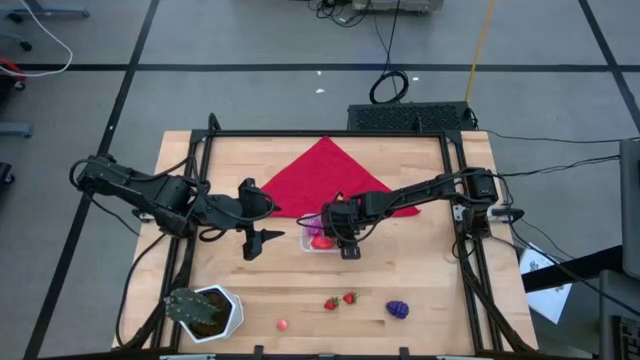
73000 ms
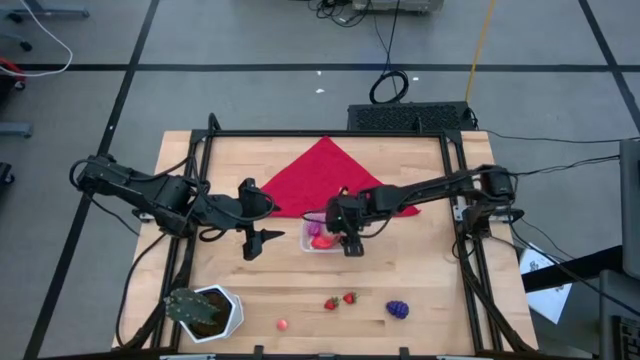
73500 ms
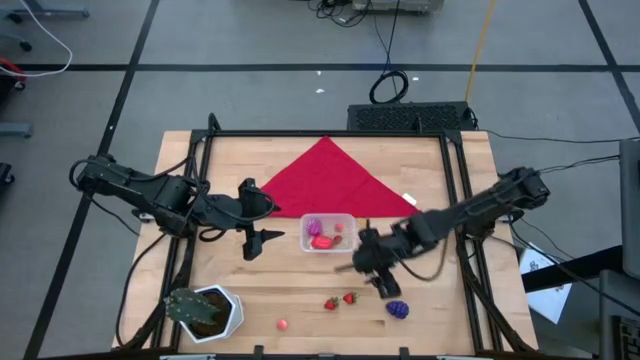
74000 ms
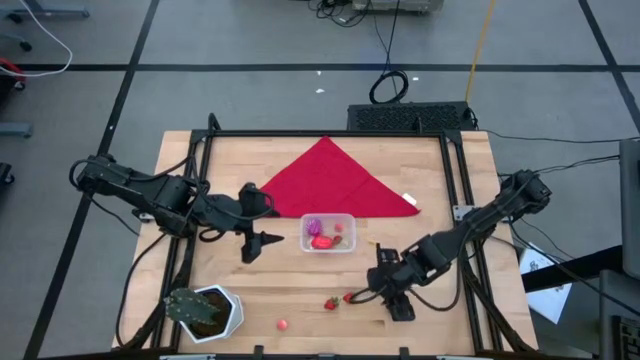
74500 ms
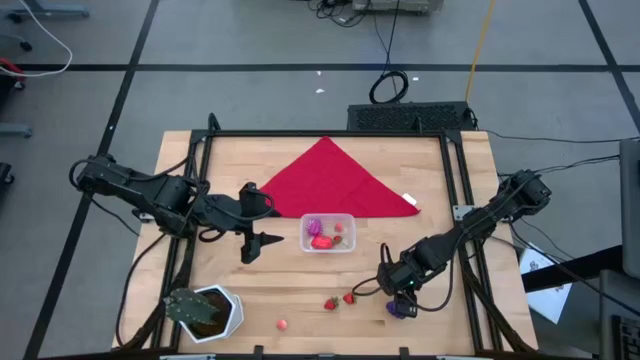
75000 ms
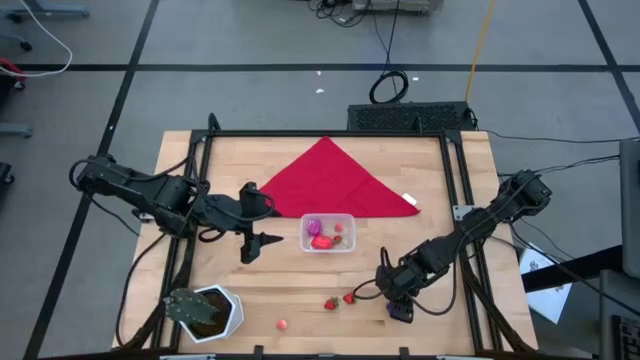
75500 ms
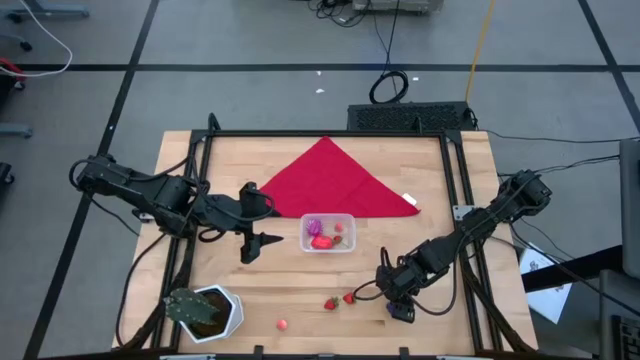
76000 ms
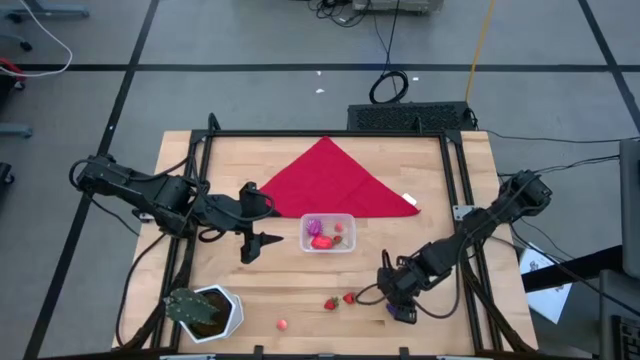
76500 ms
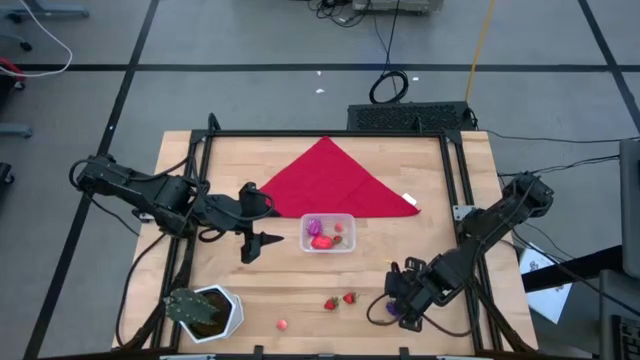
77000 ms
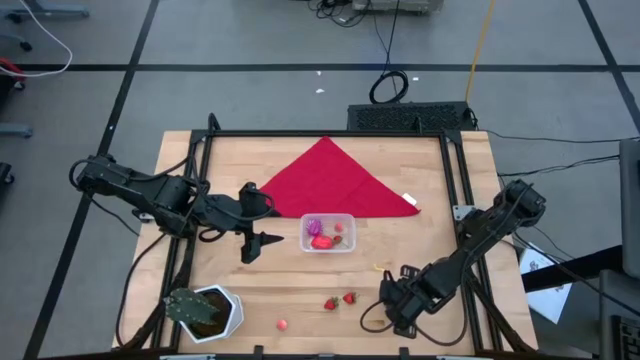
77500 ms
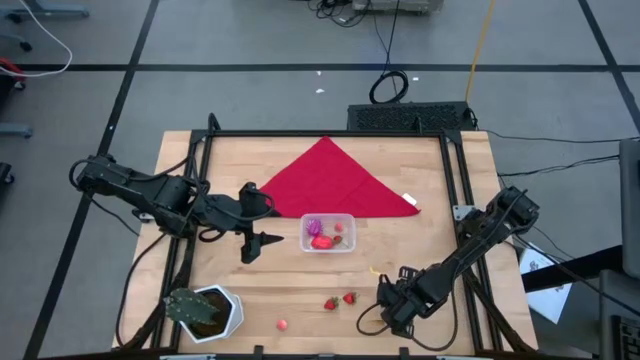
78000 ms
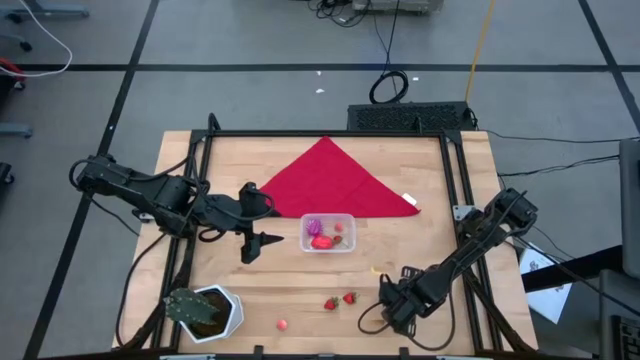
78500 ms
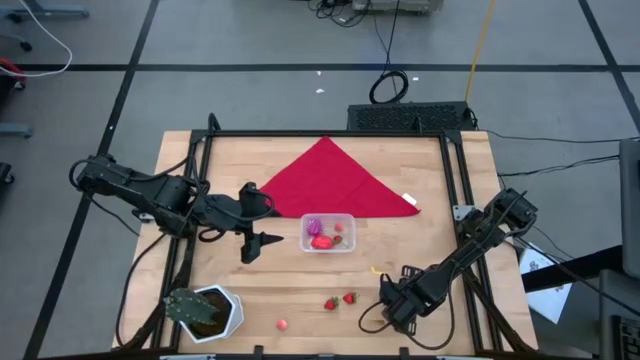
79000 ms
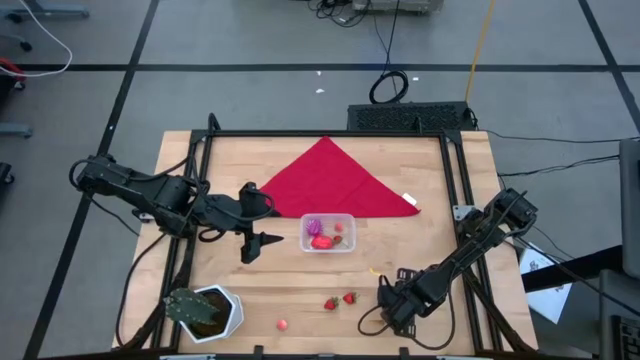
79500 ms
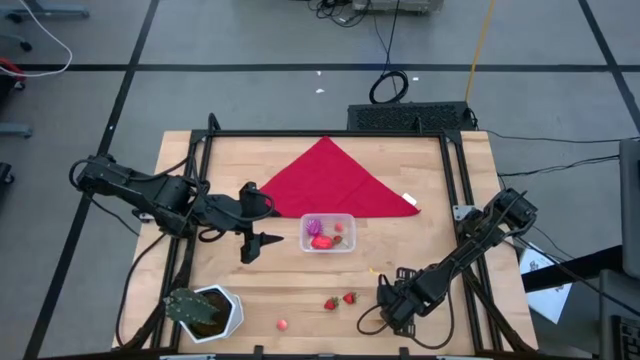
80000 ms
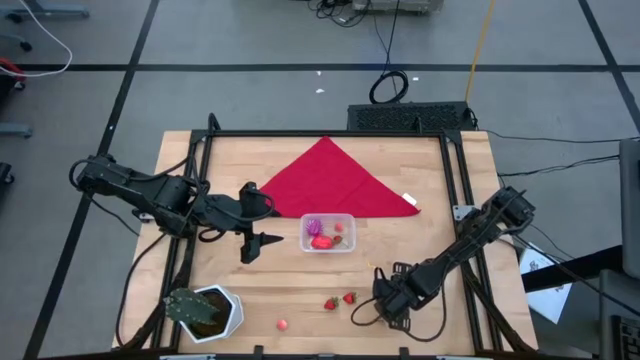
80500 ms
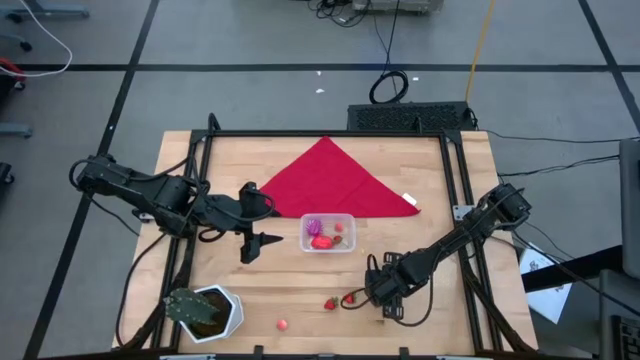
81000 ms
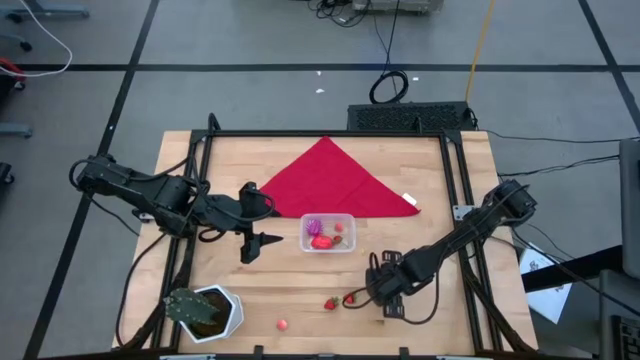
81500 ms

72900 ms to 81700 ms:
Task: Pick and placing Produce into tupperware
Put the violet grape in the transparent bin

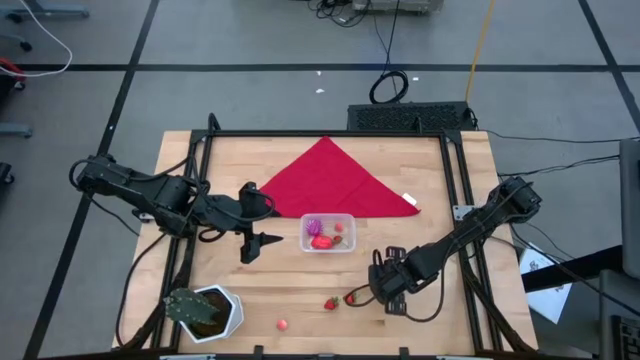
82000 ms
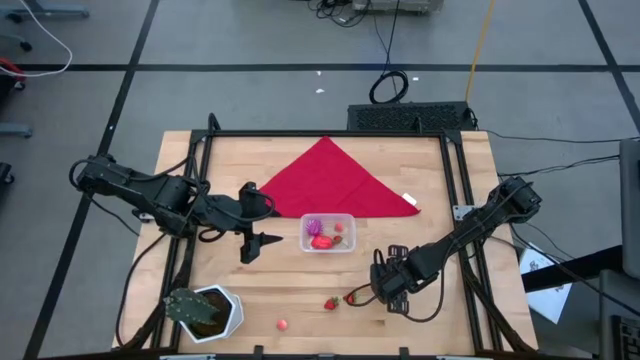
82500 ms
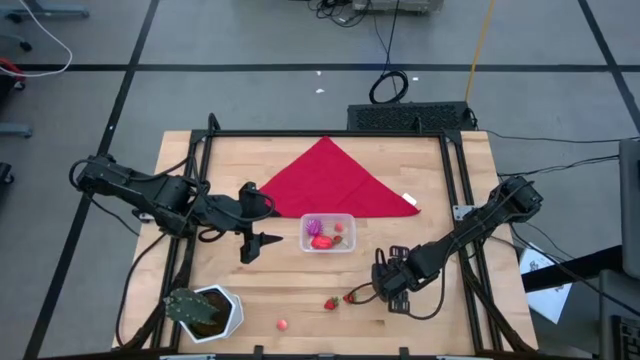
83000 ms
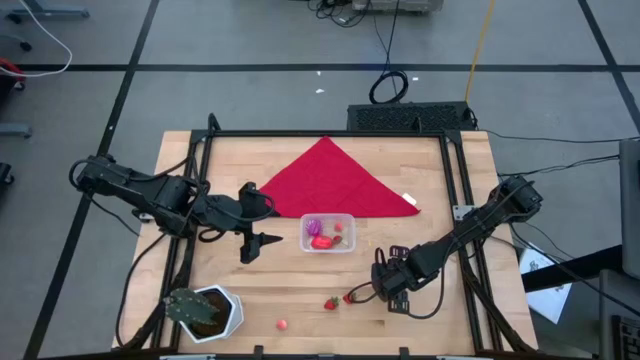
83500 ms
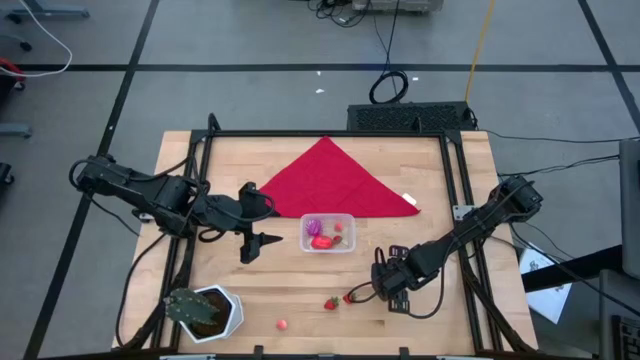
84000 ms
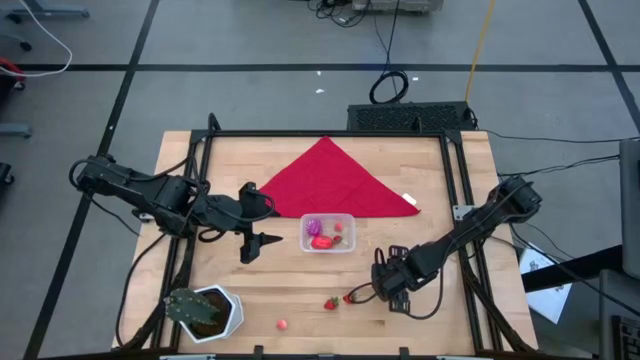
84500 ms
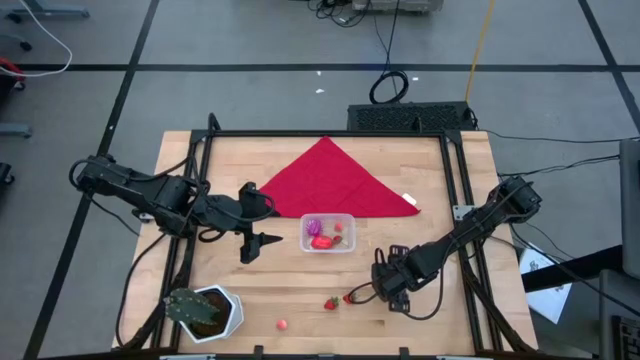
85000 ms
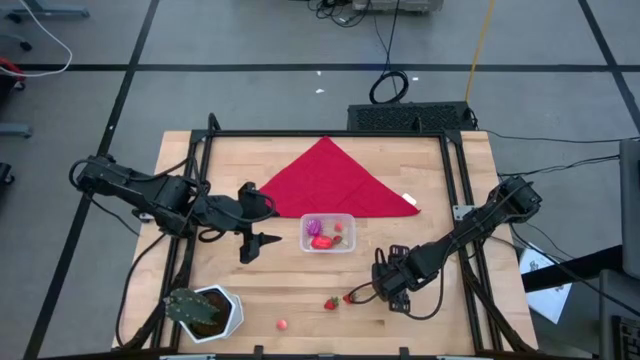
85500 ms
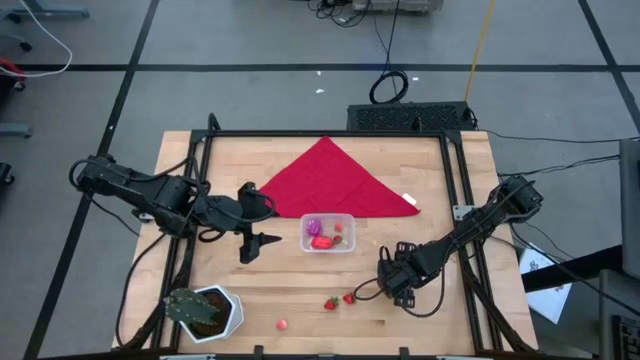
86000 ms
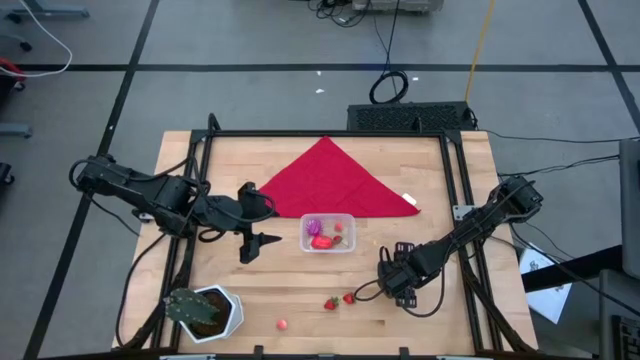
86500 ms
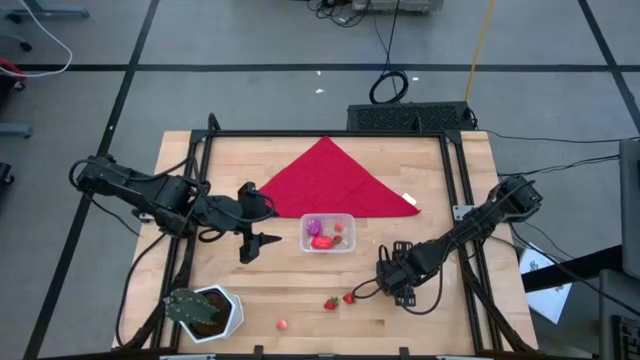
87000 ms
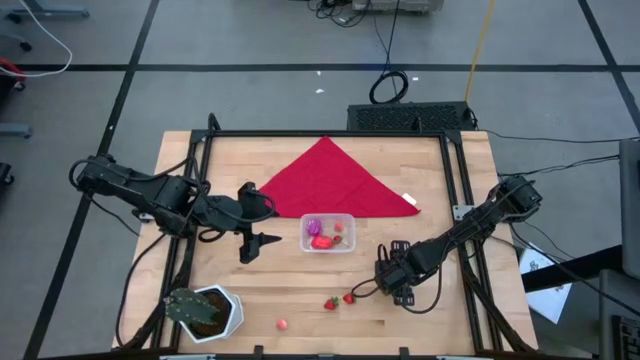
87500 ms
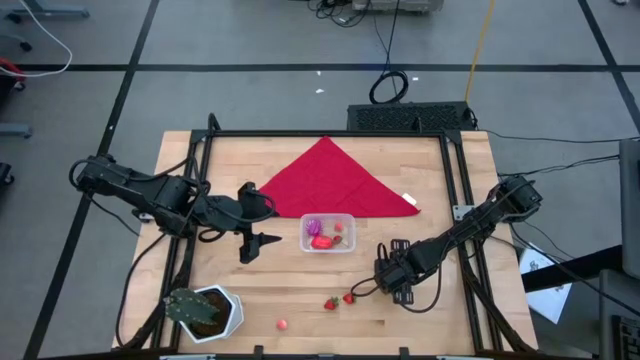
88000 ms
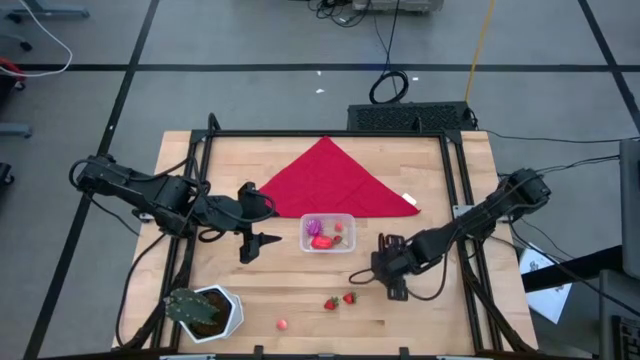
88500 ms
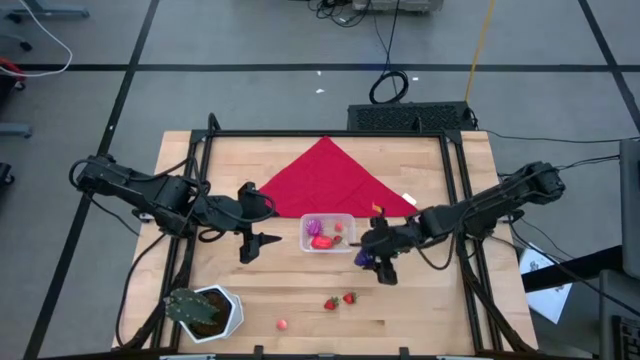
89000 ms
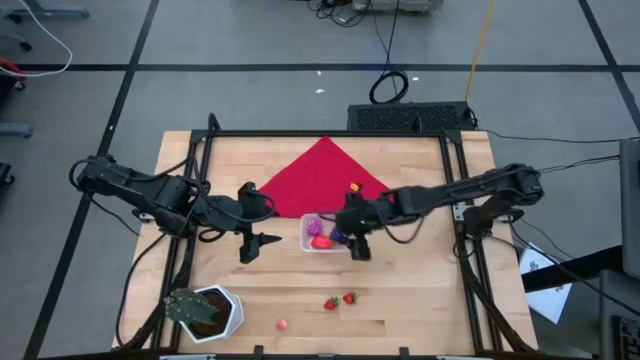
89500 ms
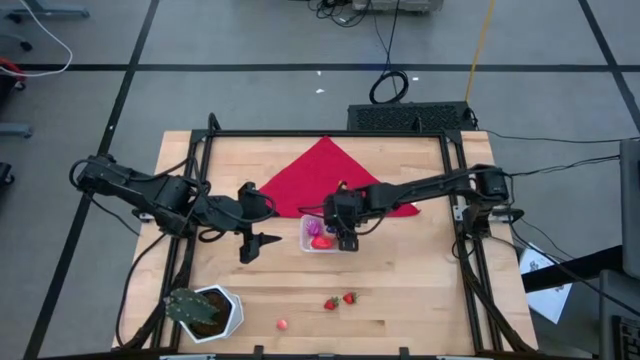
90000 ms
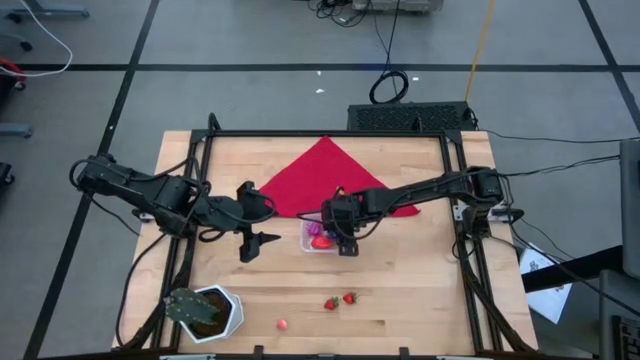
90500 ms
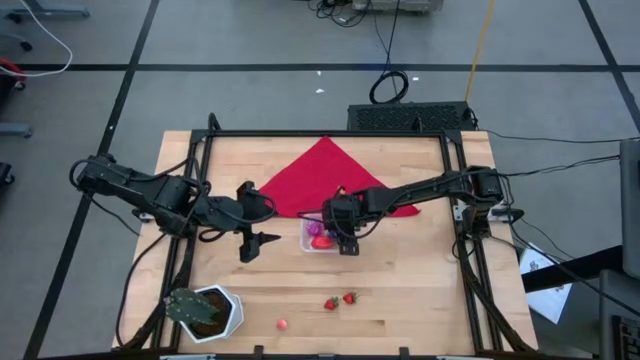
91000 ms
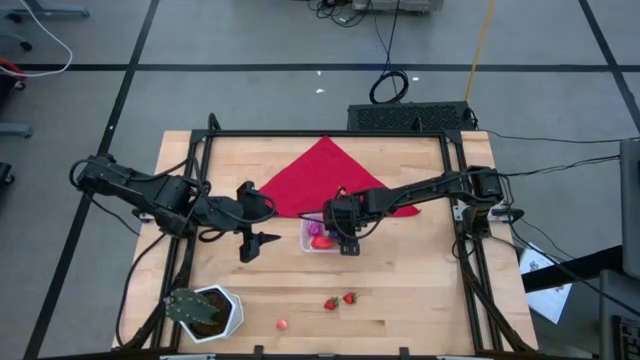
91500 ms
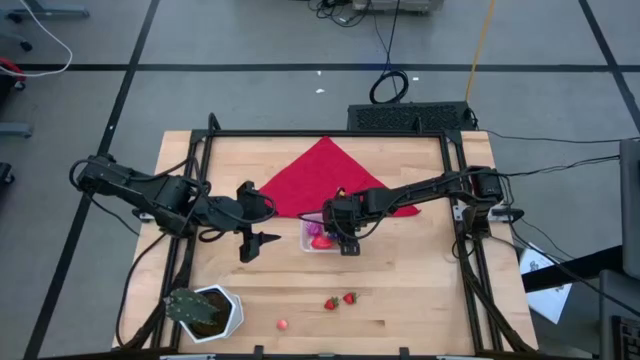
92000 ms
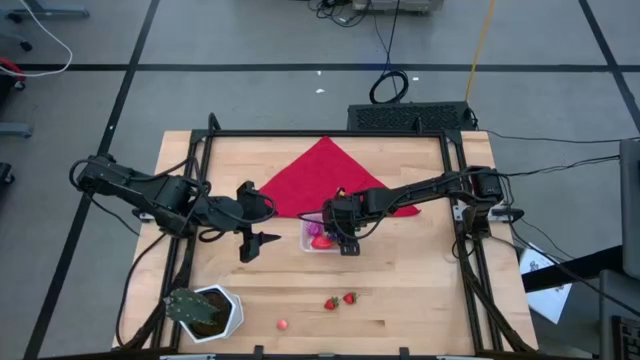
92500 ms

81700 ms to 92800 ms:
Put the violet grape in the transparent bin

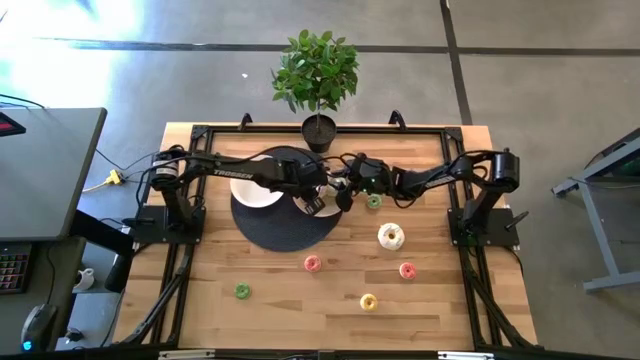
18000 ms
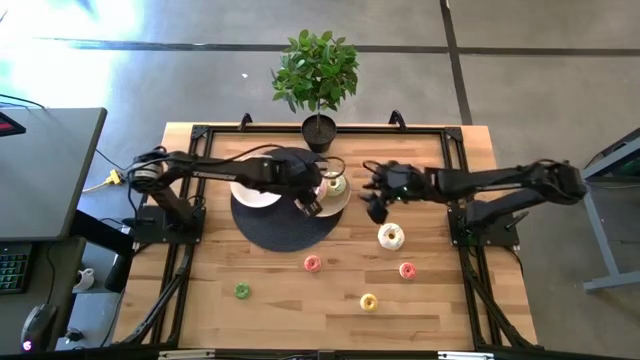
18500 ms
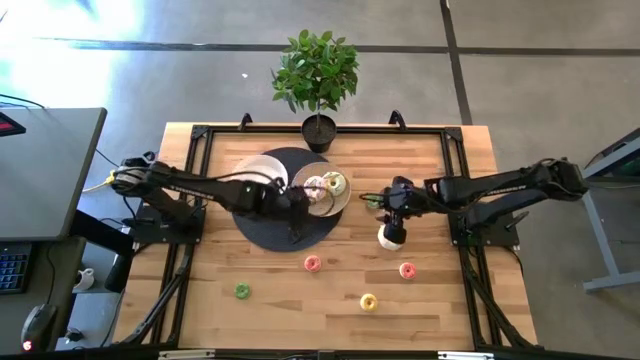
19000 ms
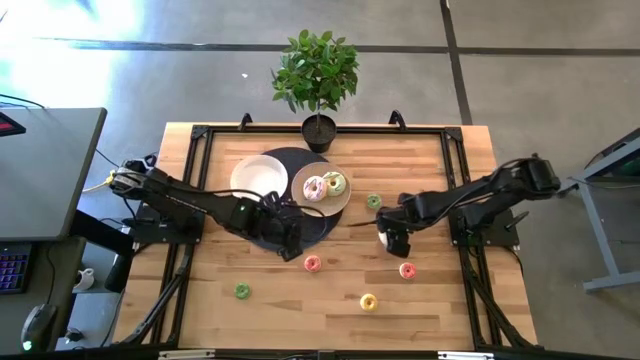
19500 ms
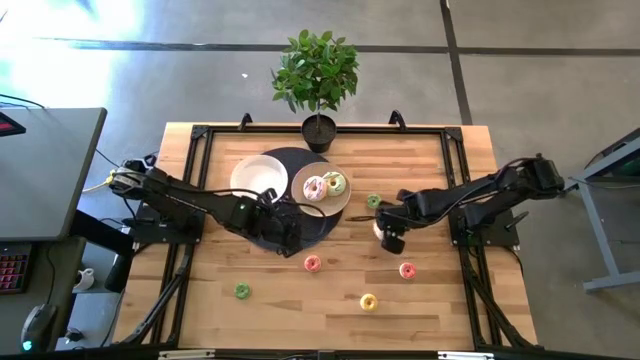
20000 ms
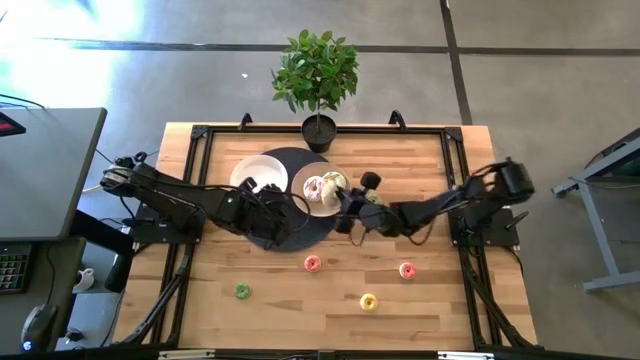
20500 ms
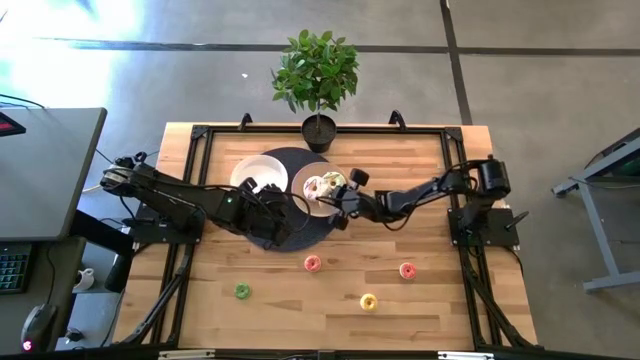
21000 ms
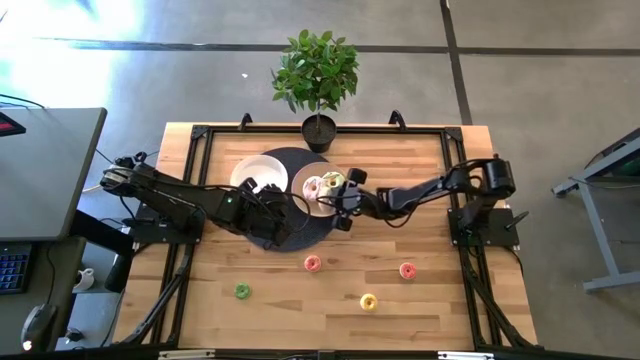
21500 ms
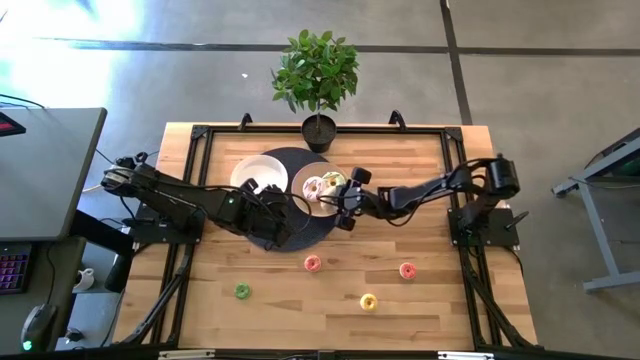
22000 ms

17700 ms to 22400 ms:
Task: Pick & Place donuts
Put the large white donut onto the brown plate
